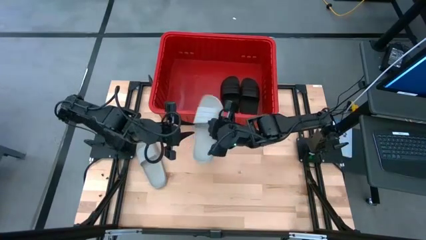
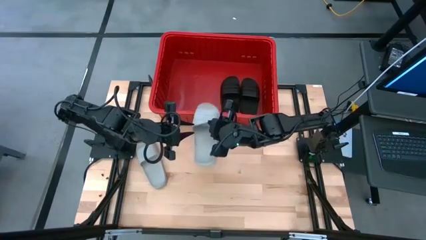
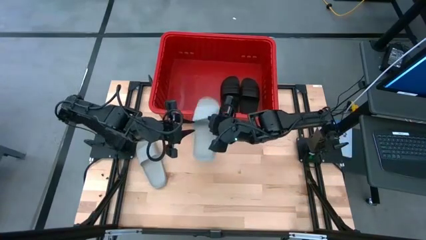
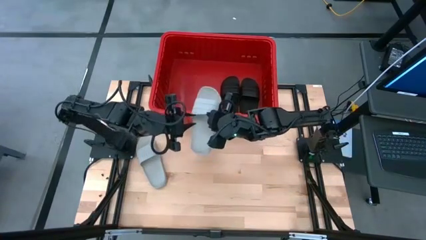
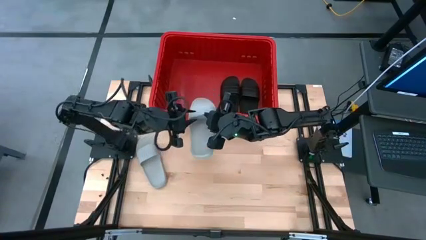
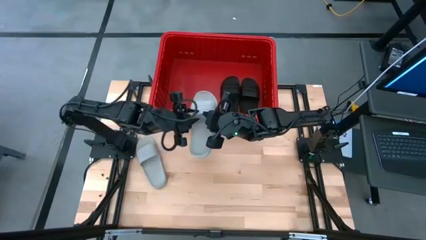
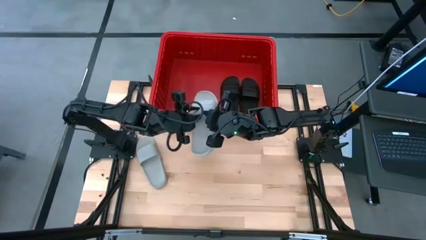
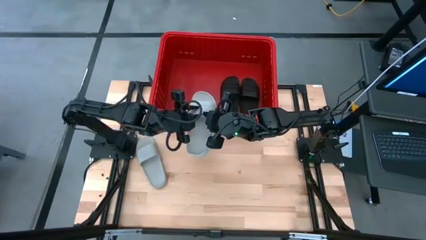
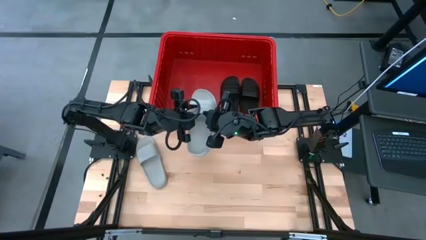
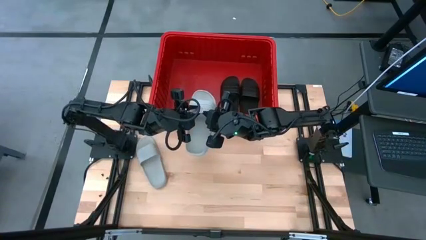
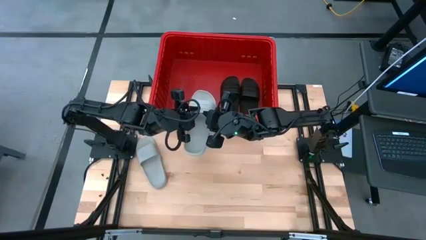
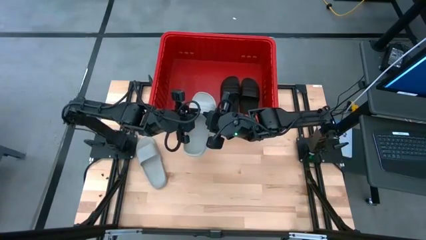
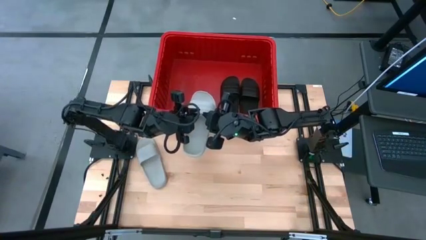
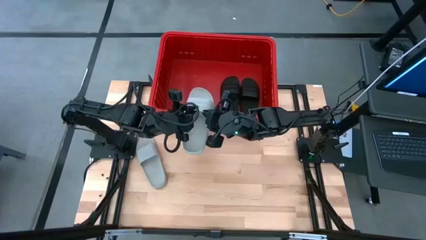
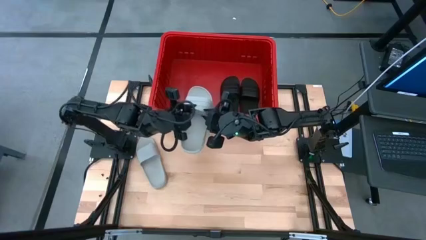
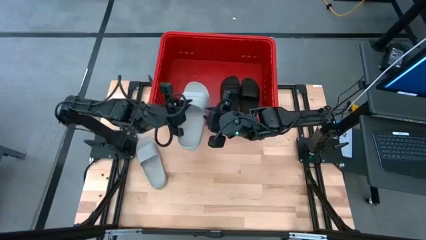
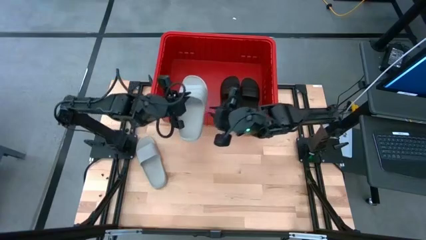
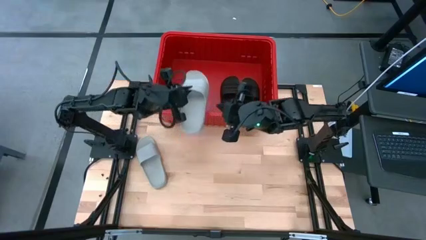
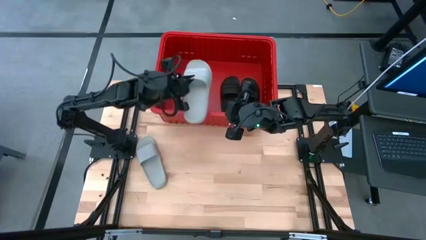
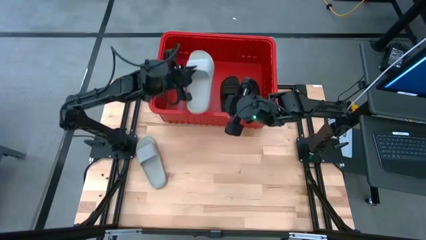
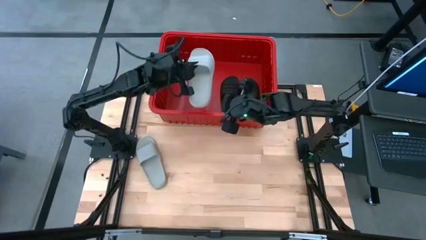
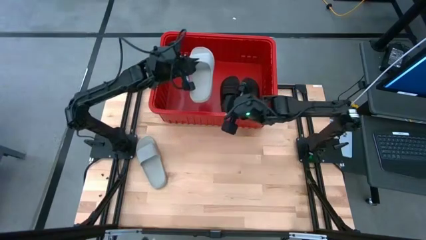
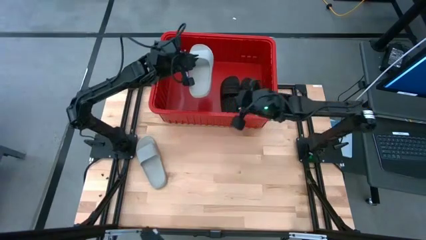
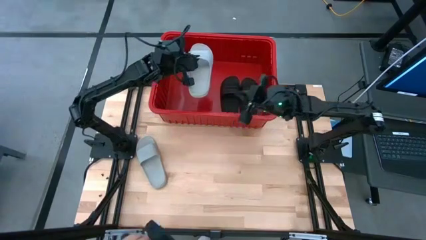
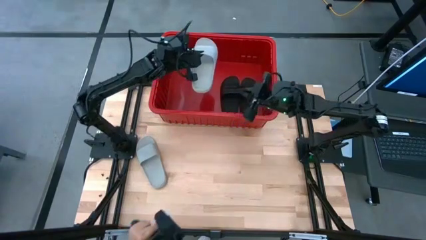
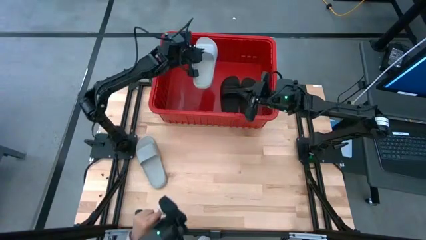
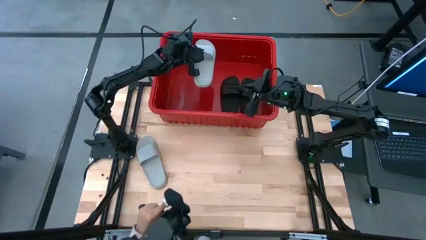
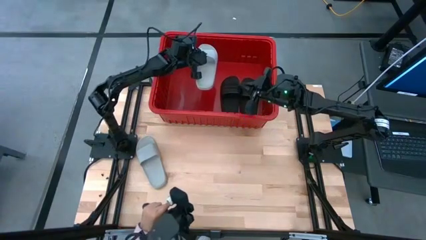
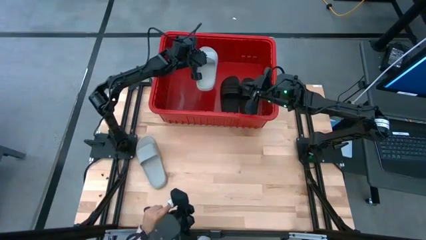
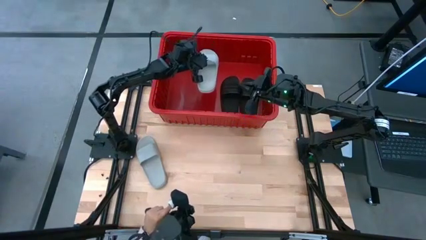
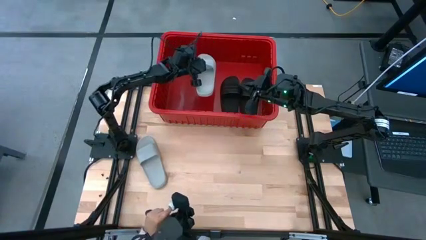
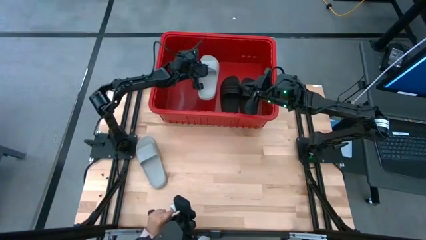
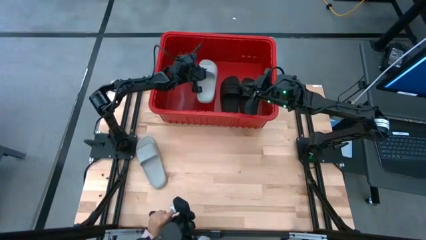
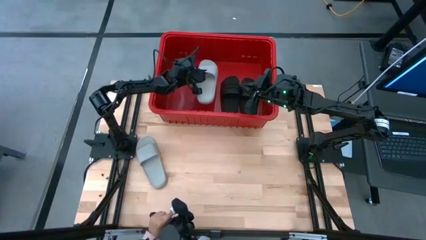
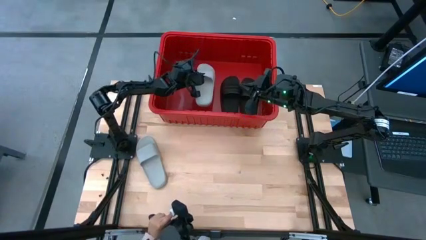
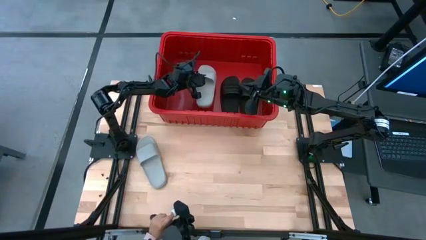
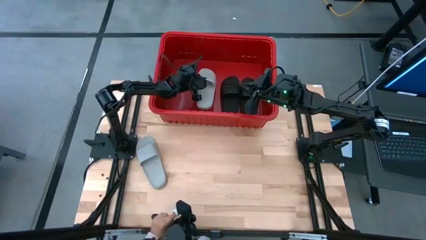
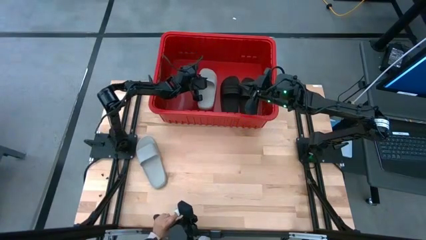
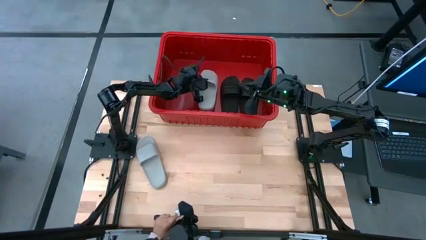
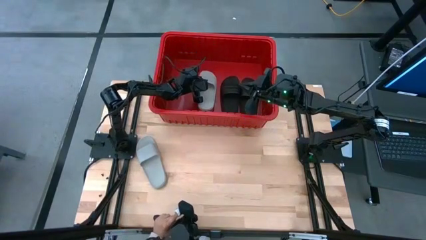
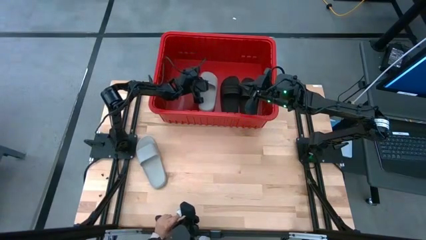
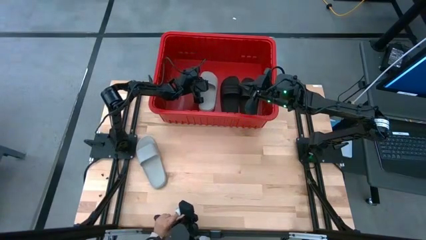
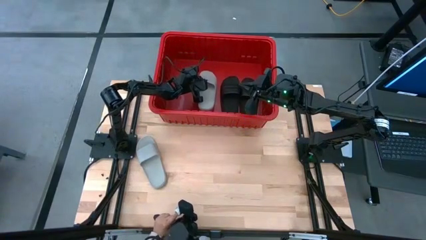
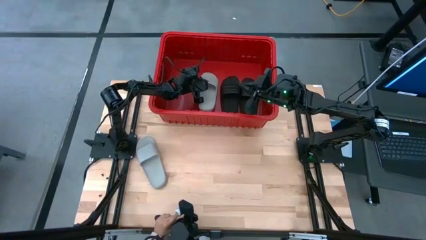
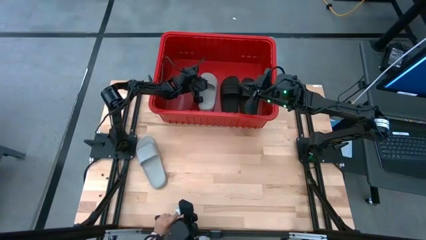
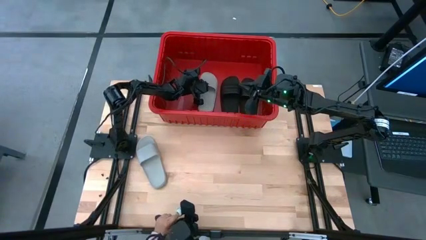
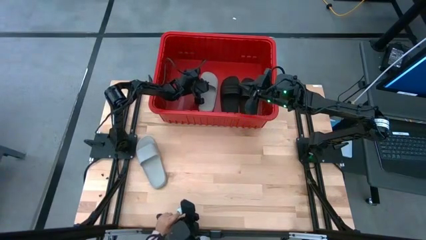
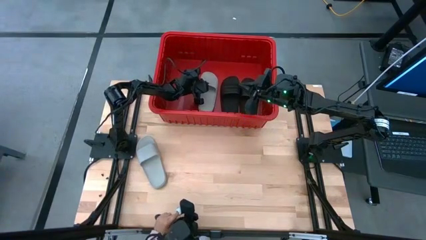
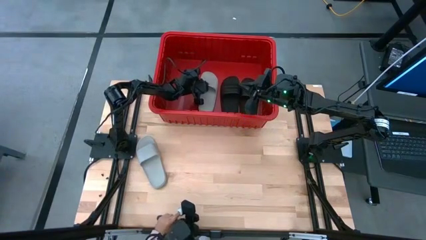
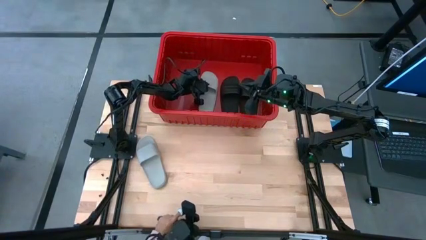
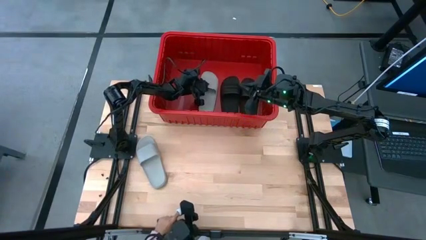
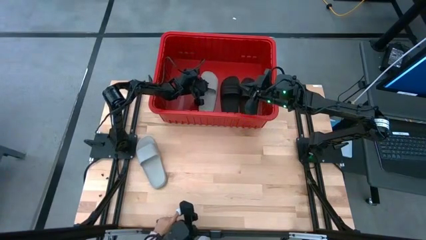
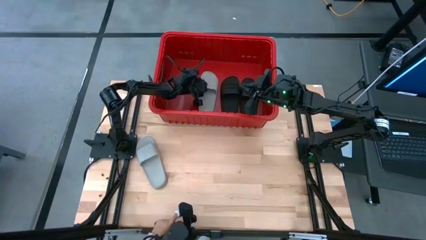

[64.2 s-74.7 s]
Task: Pick and place slides into bin
Put the right gray slide into the red bin

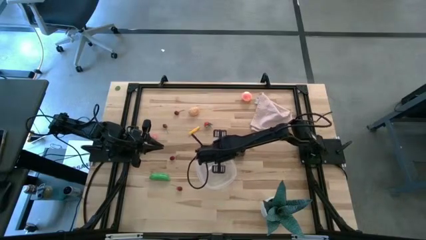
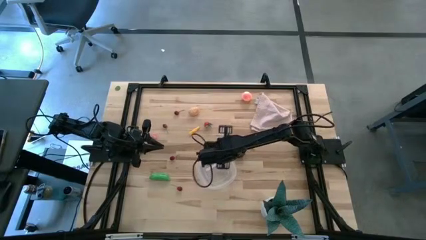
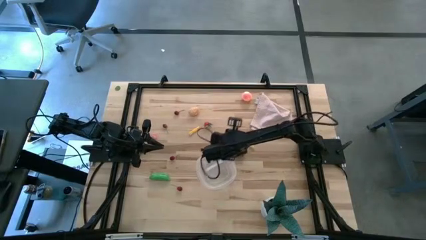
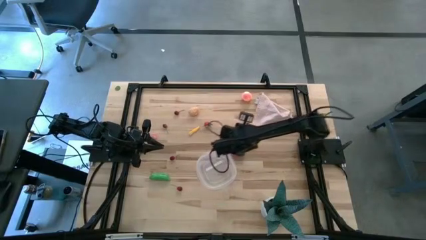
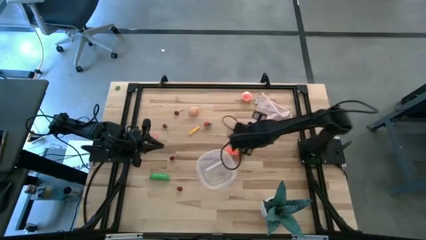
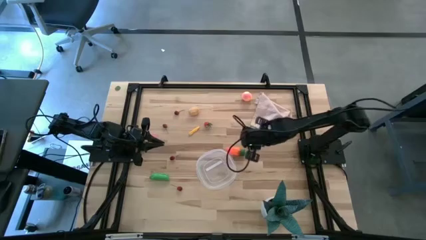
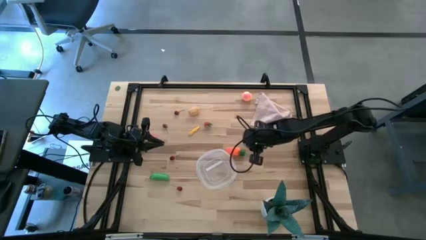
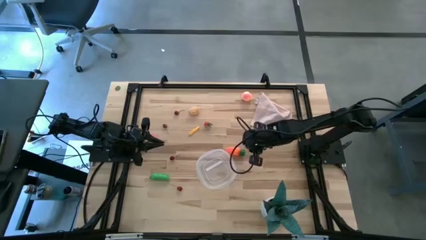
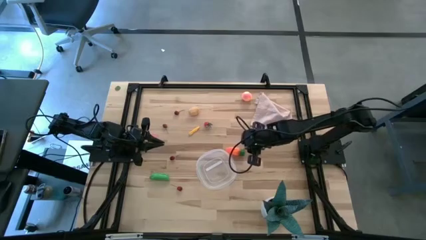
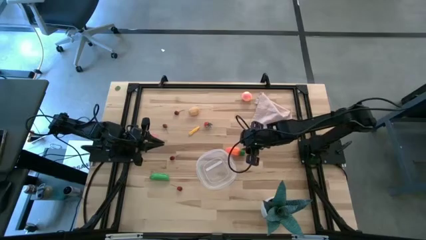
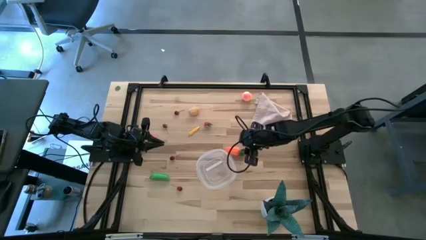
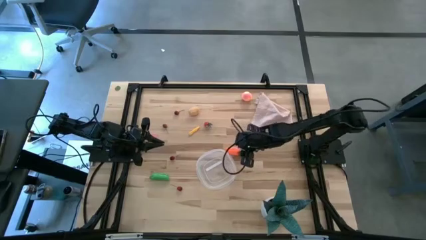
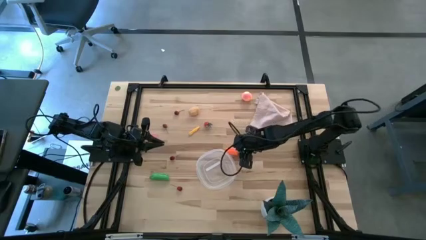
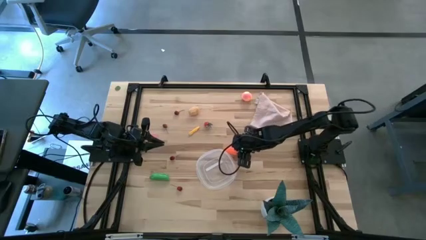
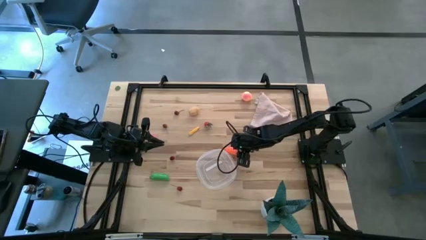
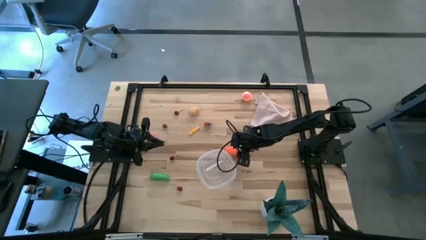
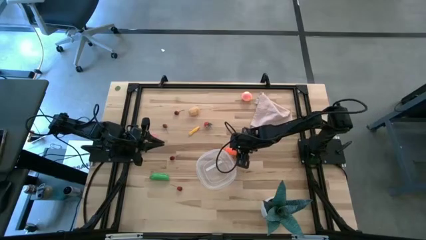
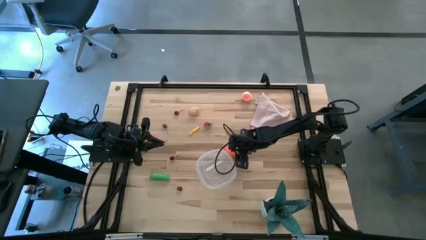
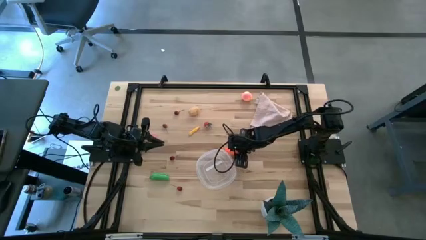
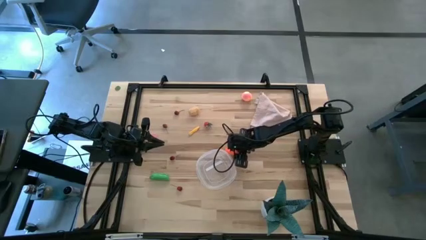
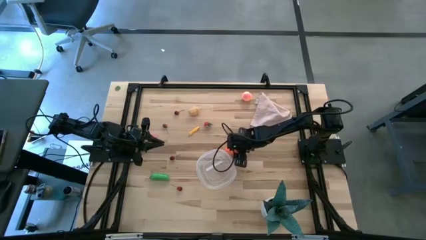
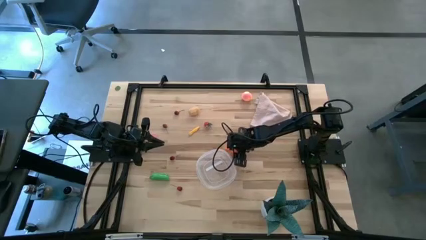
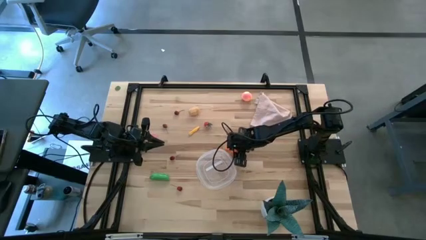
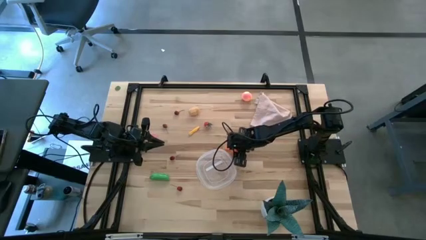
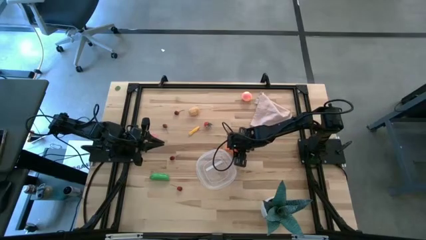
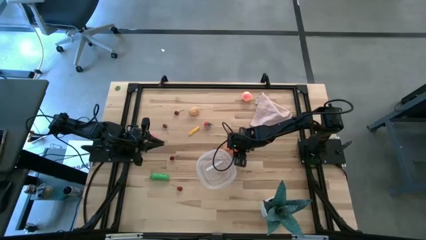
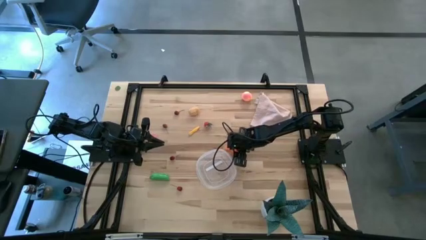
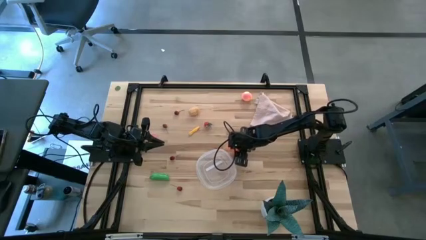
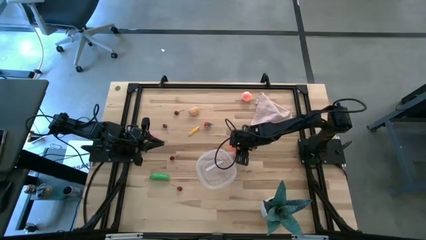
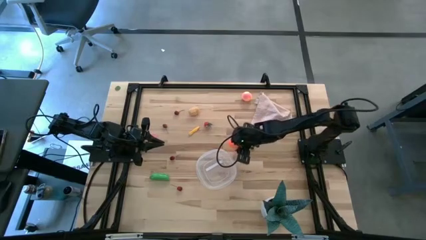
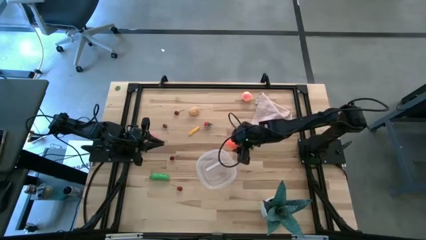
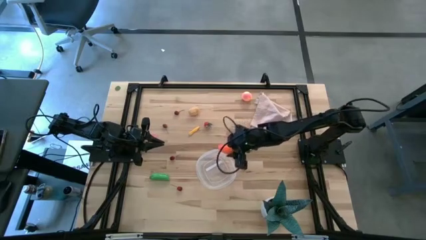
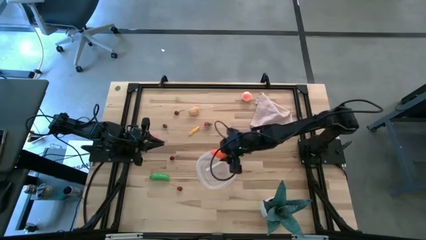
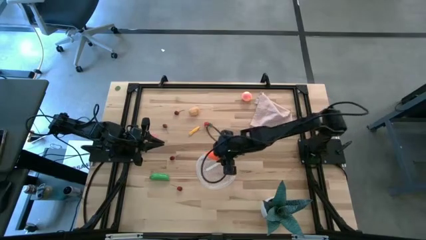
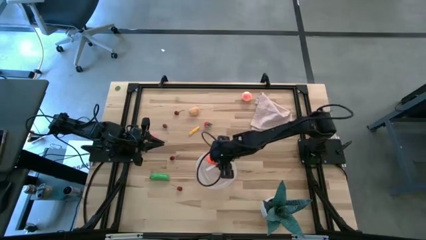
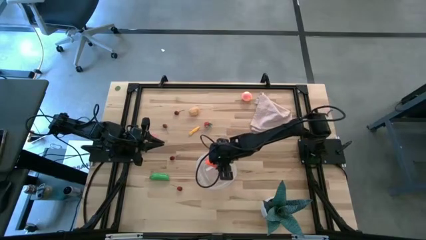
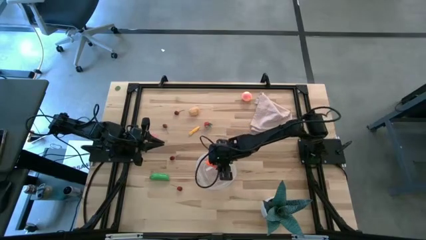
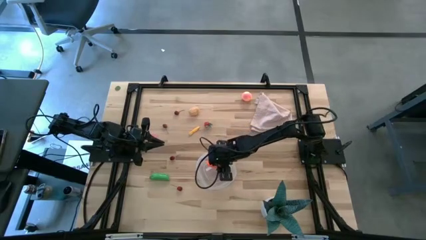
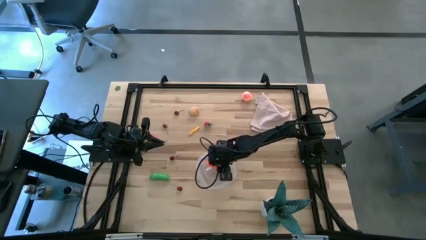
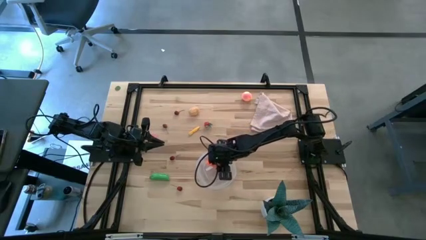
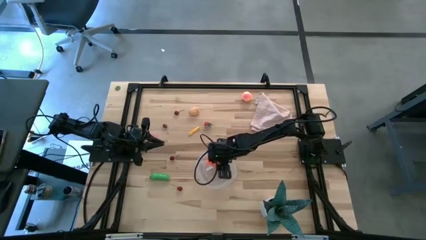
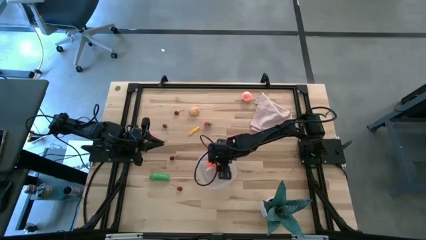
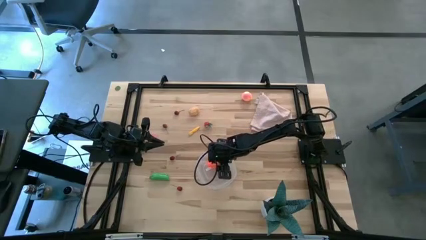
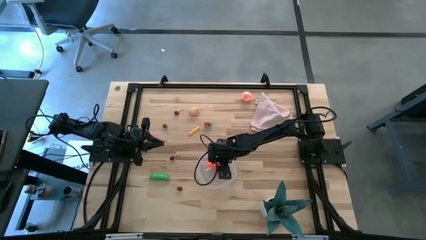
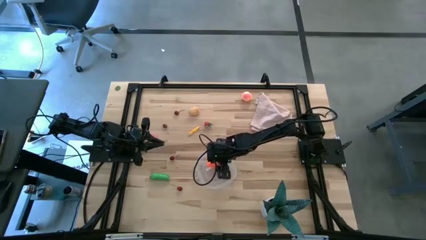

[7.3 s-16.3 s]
Task: Pick and placing Produce into tupperware
Put the carrot into the transparent bin
